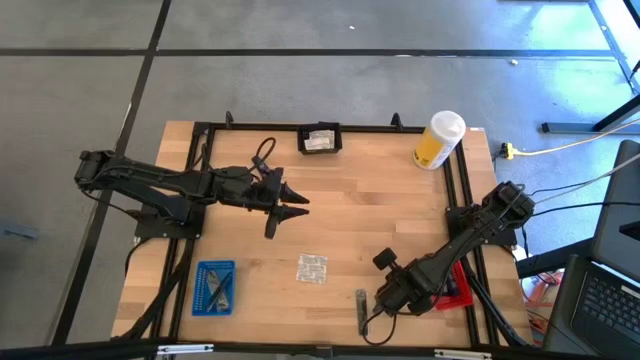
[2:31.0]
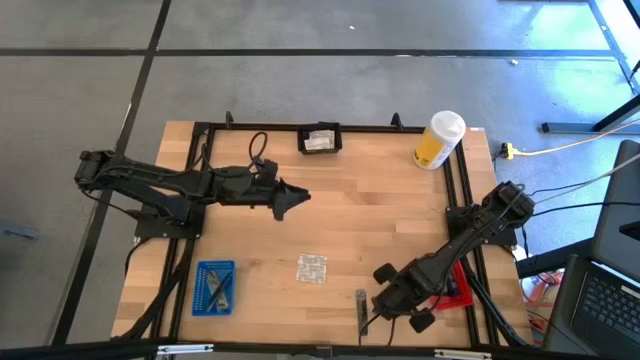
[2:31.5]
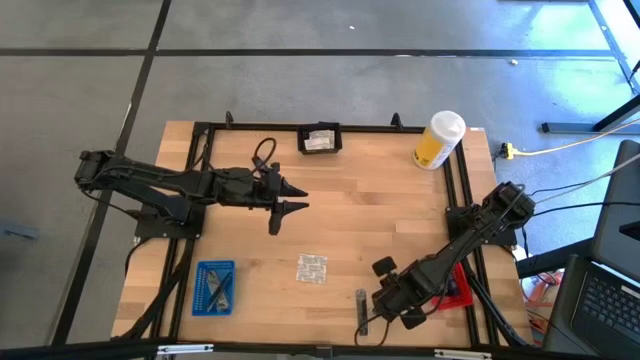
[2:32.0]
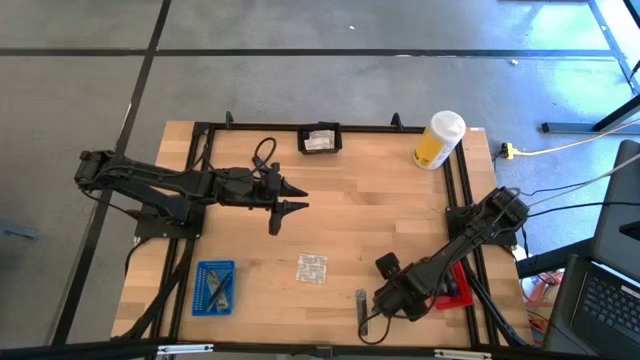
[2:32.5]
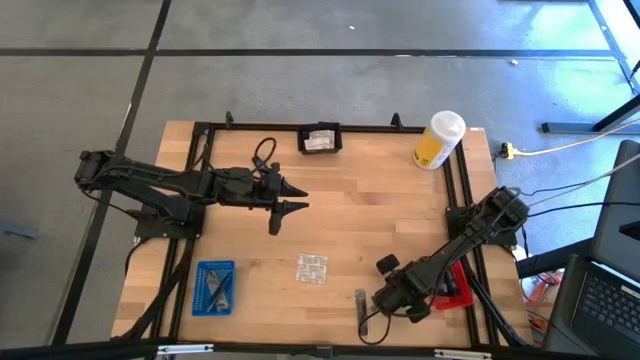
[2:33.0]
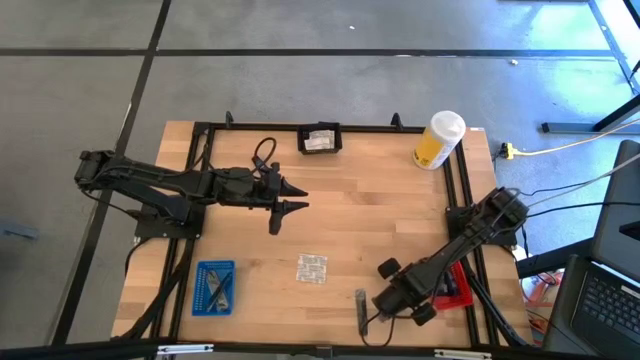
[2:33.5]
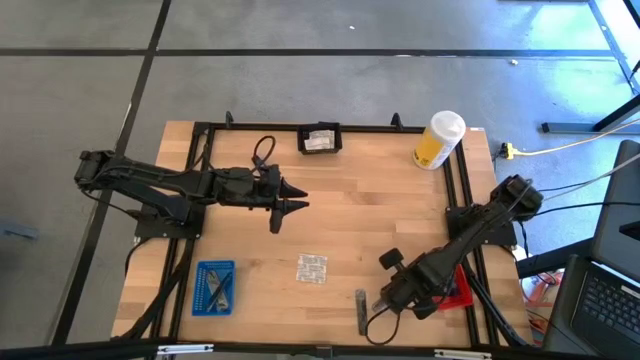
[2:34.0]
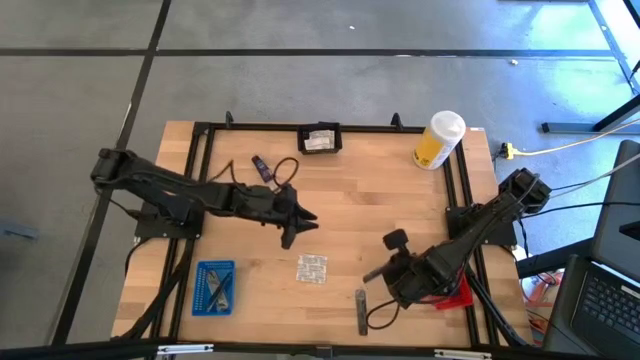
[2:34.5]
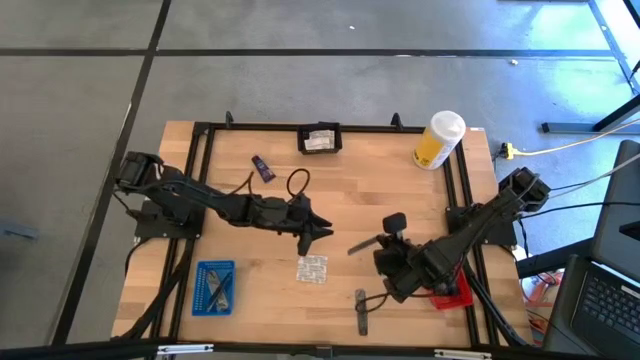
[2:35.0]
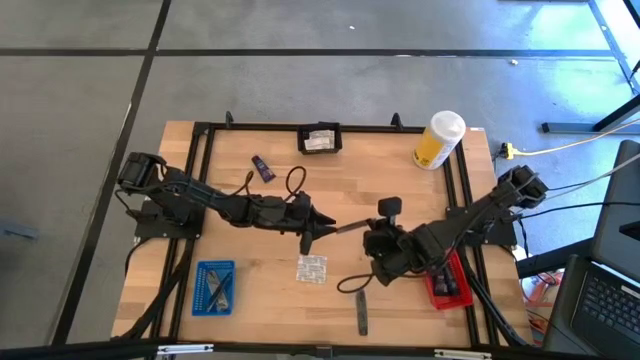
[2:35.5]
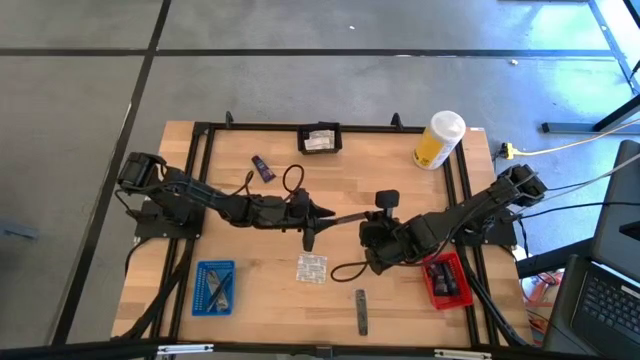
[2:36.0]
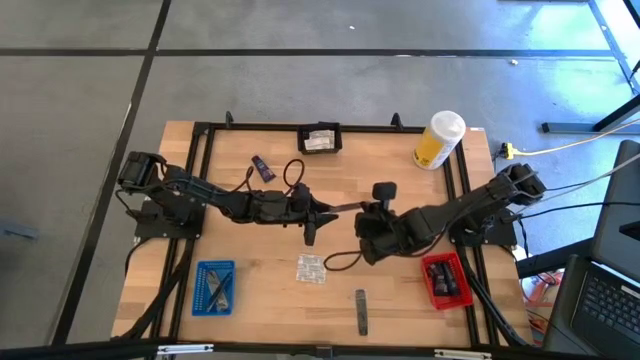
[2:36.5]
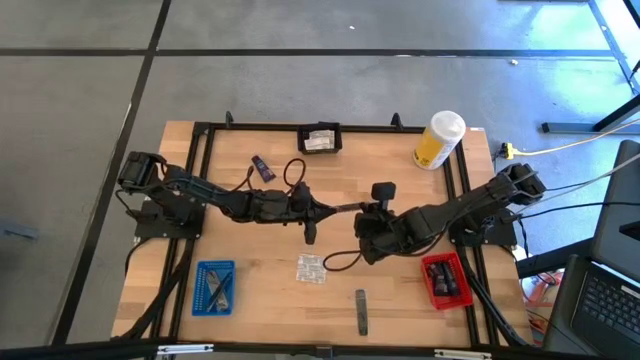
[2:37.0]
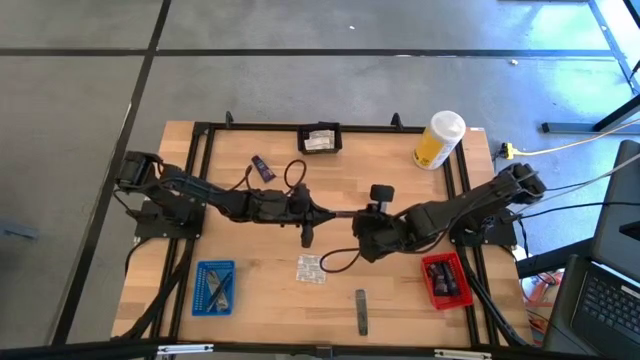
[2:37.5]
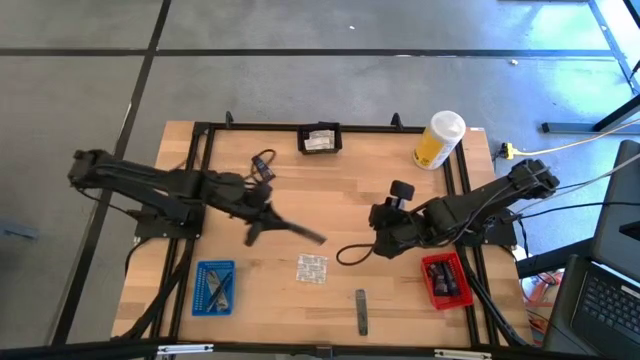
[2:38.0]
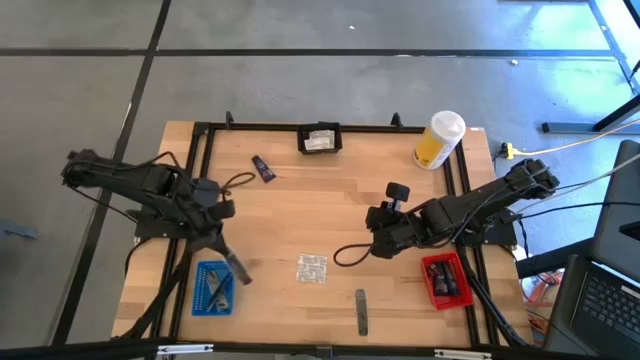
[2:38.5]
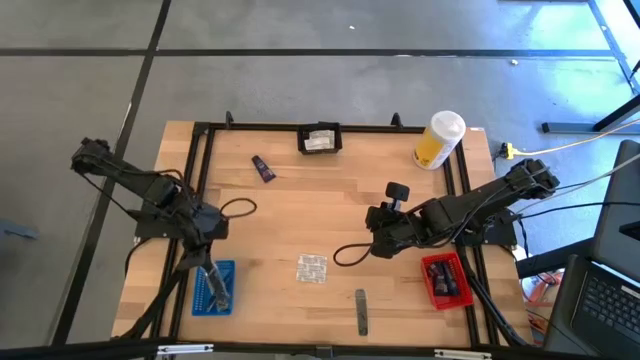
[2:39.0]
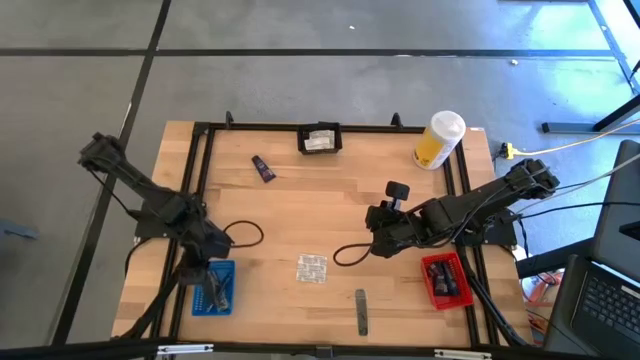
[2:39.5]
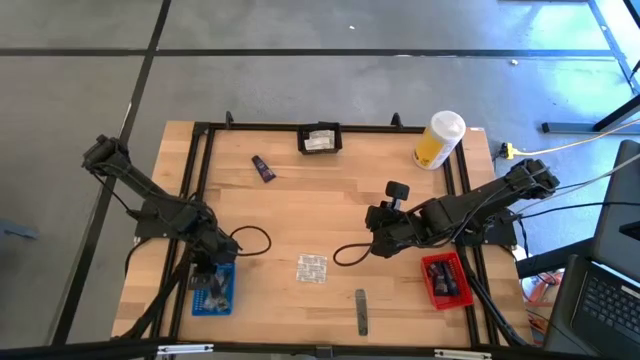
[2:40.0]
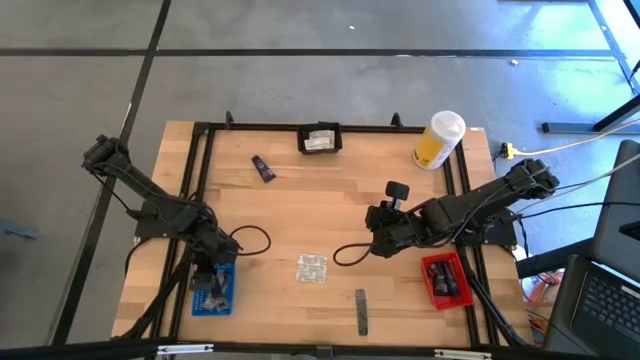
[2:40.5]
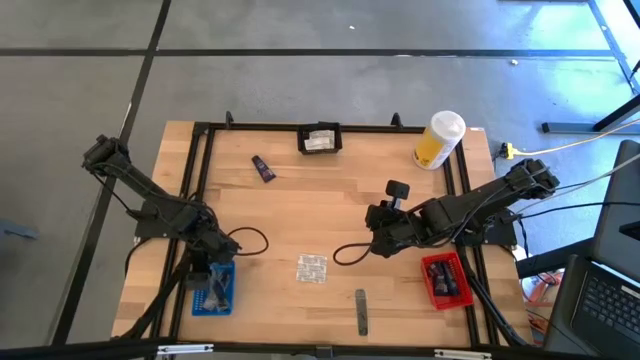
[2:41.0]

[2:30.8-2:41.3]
Task: Pick & Place Travel size toiletries
Put the black comb into the blue bin

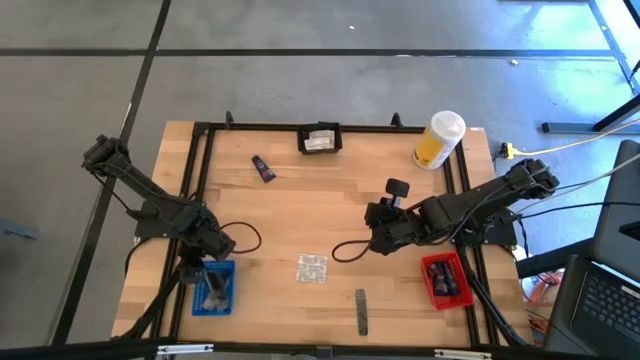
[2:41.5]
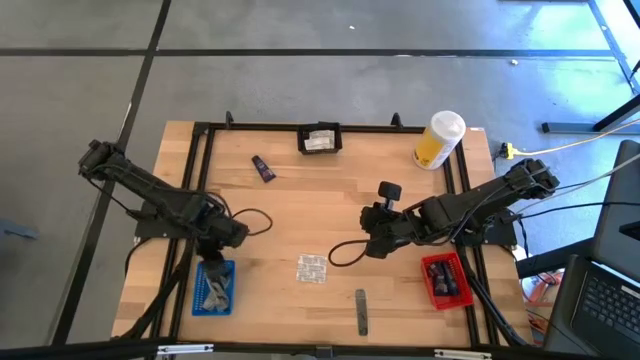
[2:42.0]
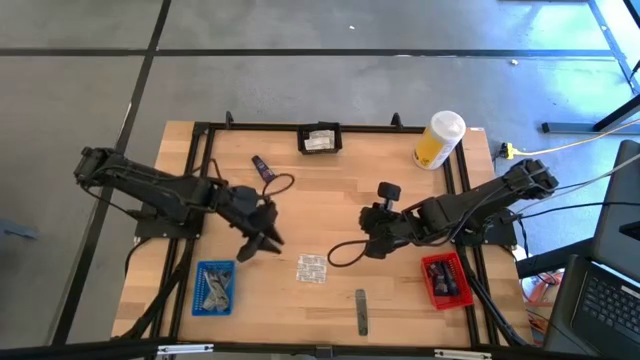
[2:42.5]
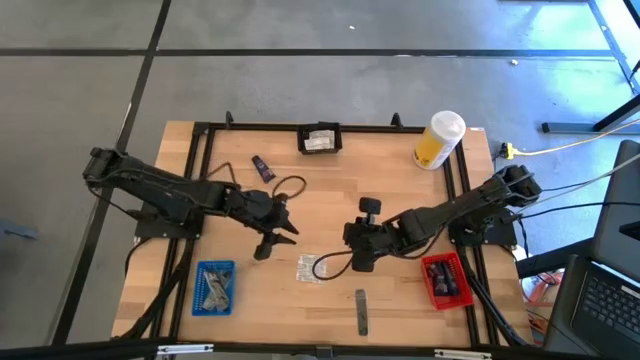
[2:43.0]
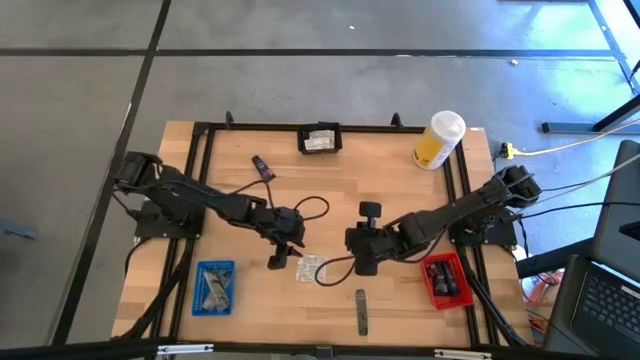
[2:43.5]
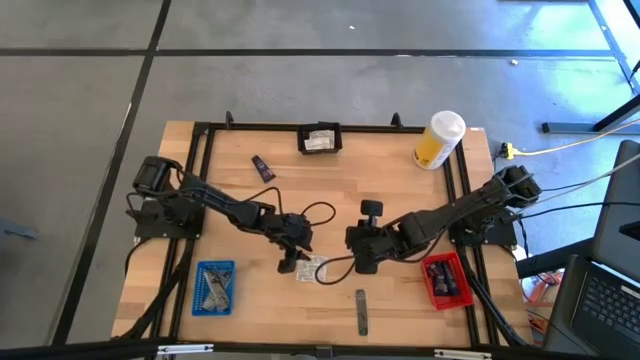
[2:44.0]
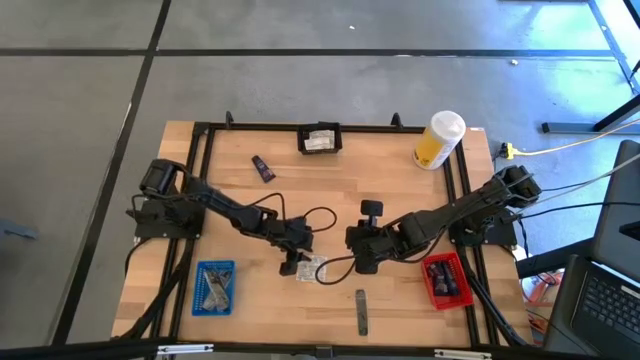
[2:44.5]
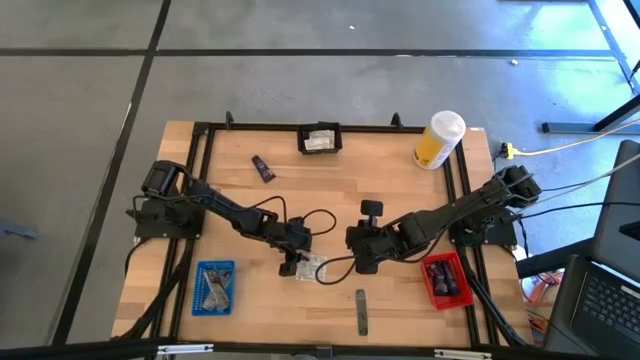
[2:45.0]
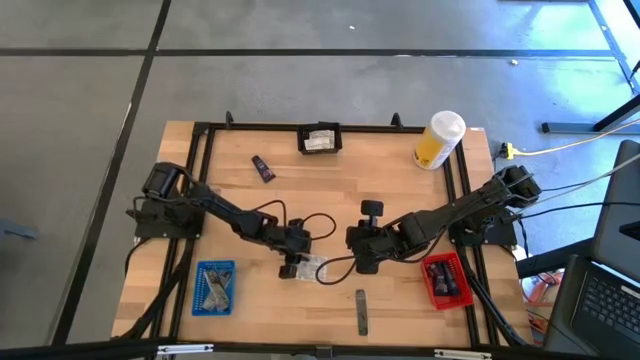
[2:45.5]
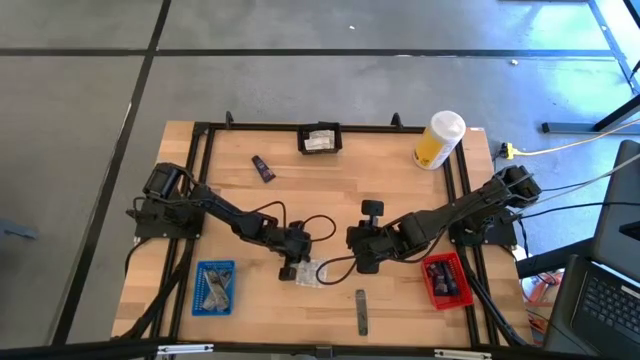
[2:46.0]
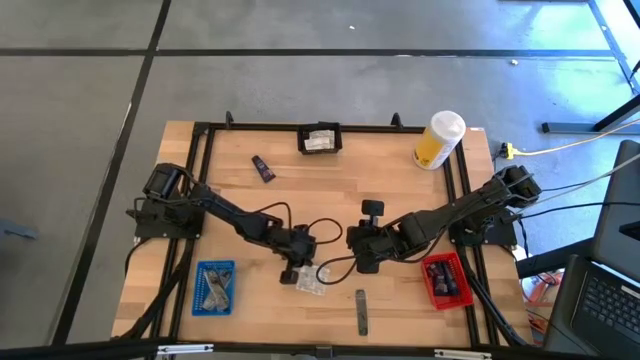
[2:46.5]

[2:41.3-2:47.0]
Put the white bandage into the black bin

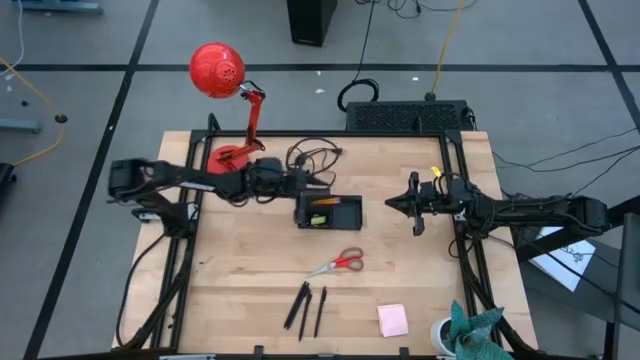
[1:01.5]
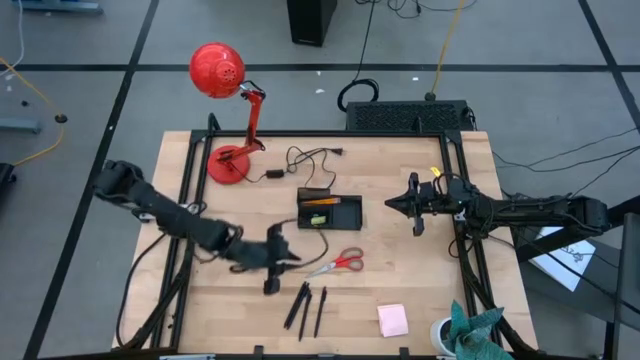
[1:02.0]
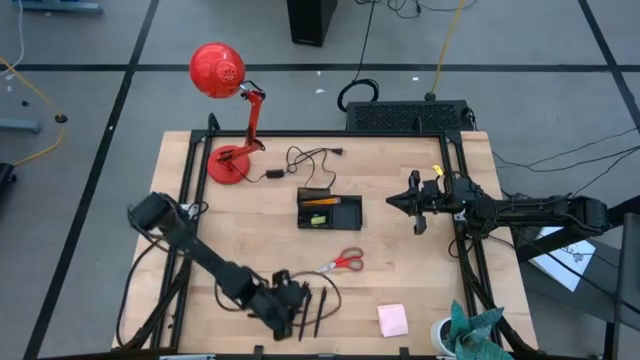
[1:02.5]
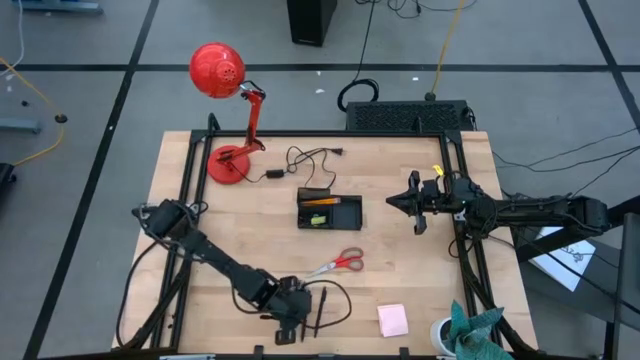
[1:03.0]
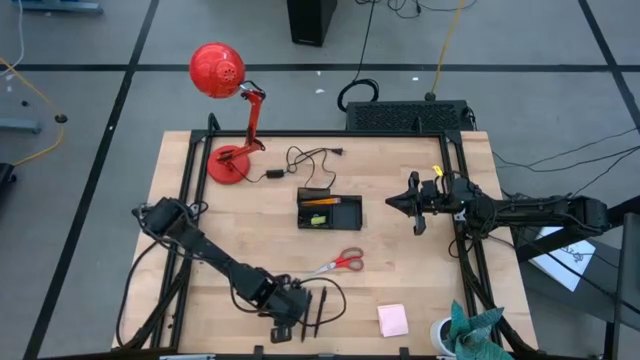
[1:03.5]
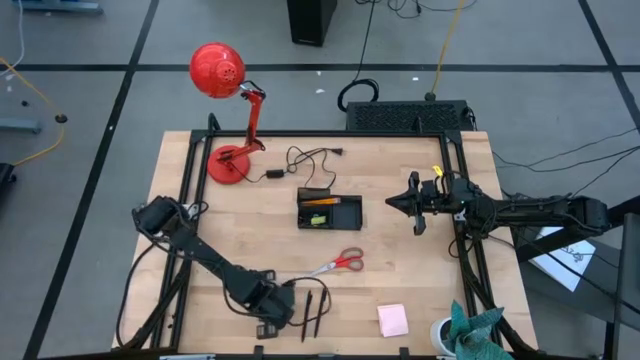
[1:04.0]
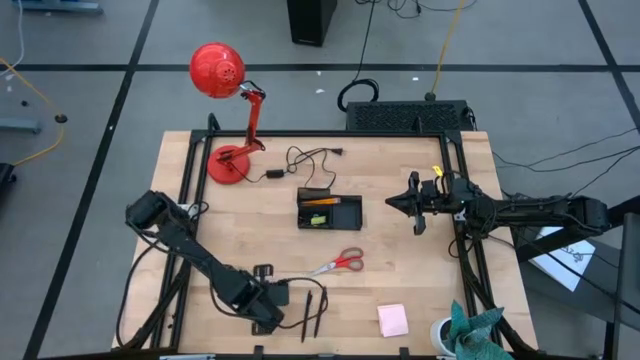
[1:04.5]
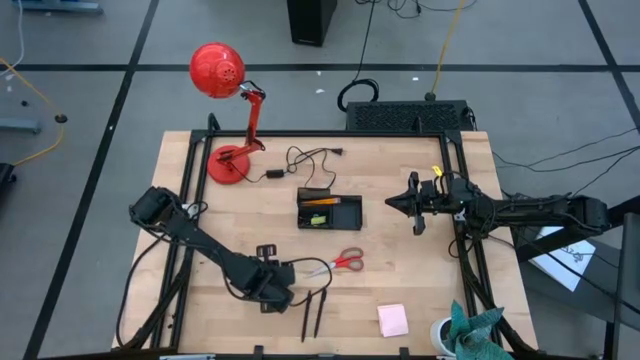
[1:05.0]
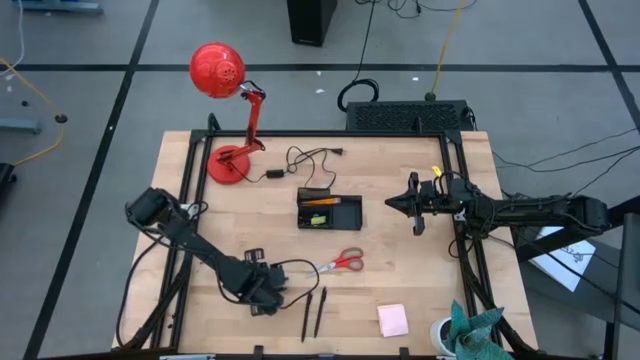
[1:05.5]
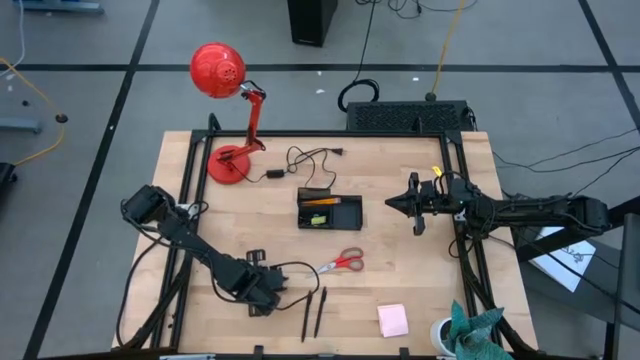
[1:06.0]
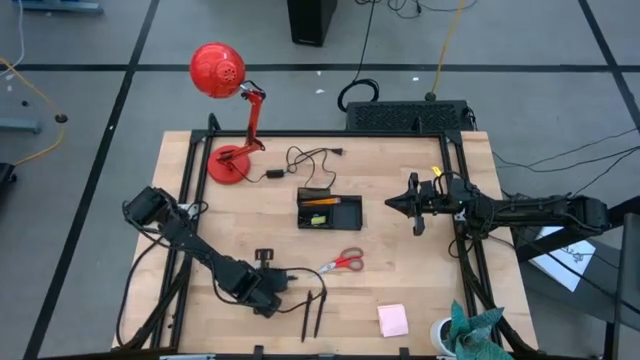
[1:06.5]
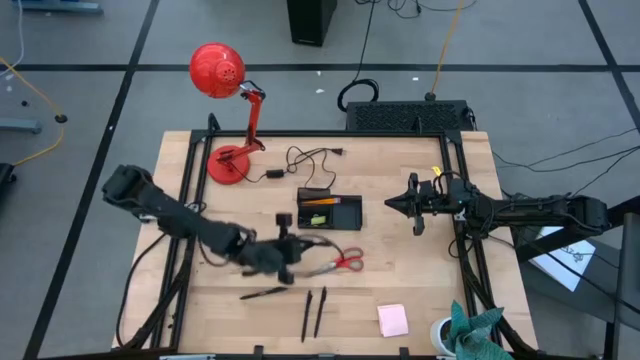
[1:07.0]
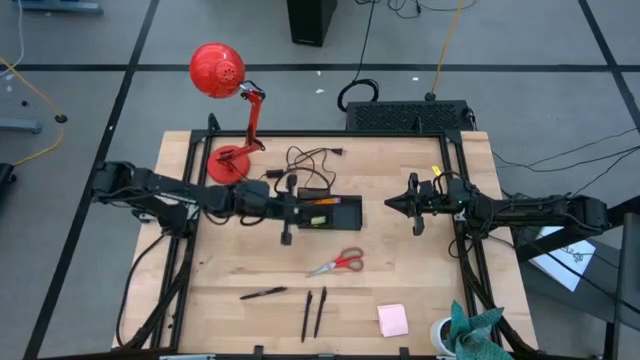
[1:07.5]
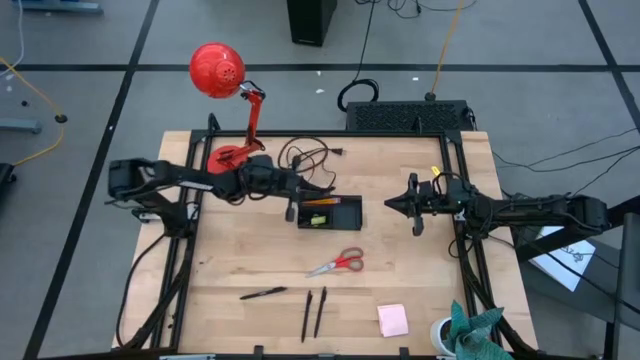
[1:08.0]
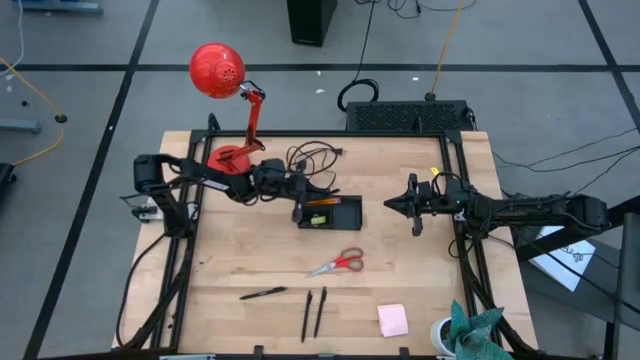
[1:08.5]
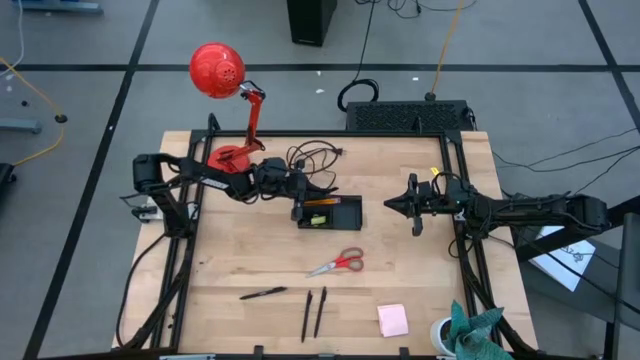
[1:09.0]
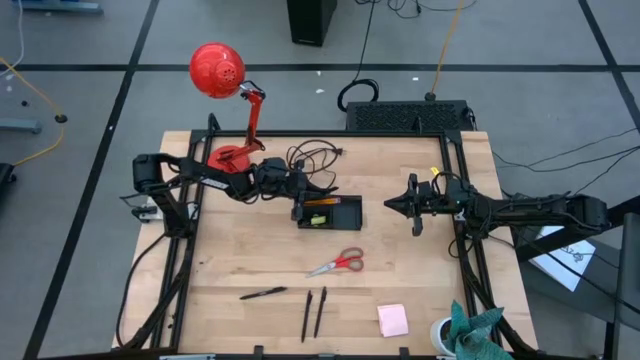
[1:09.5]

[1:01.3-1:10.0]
Task: Pick and place office supplies into organizer
Put the black ballpen into the black desk organizer
